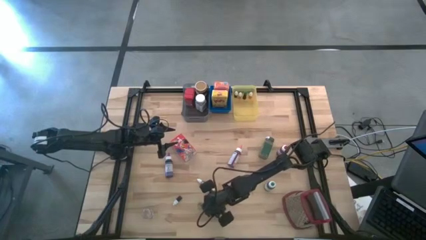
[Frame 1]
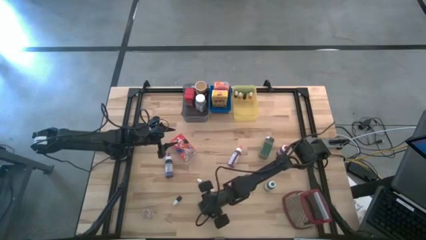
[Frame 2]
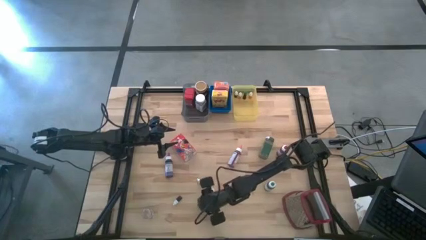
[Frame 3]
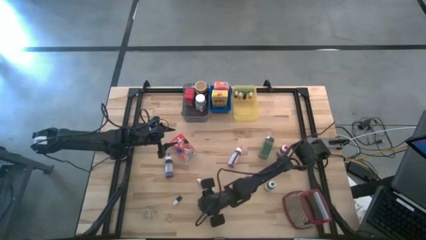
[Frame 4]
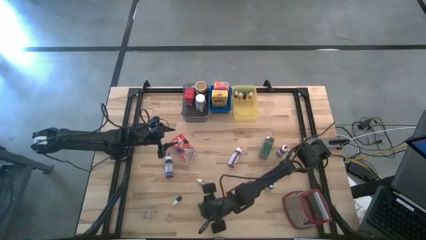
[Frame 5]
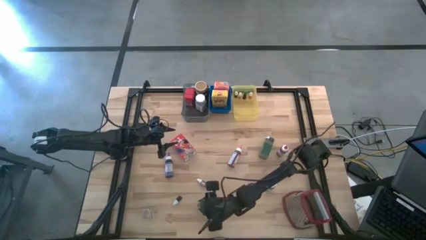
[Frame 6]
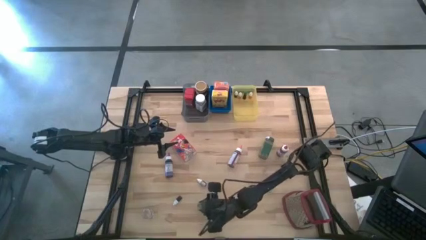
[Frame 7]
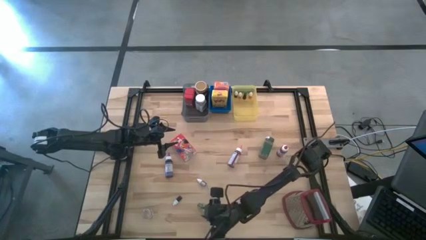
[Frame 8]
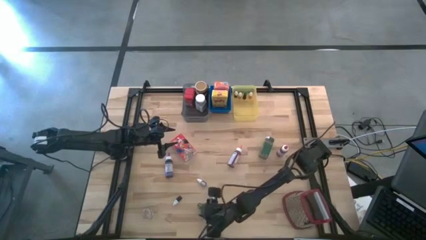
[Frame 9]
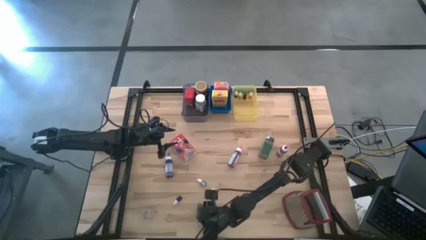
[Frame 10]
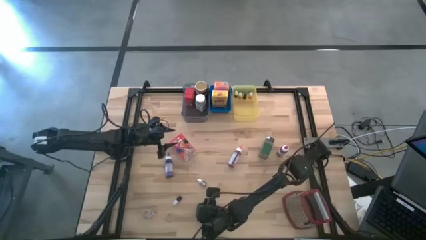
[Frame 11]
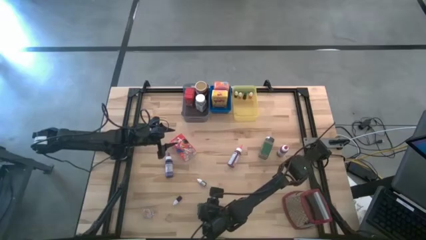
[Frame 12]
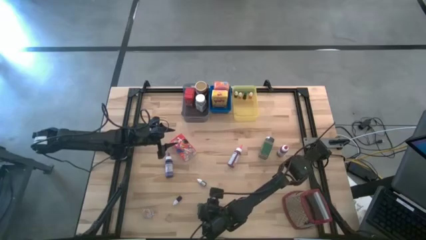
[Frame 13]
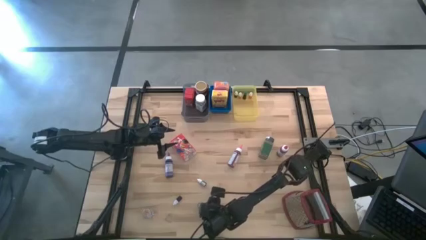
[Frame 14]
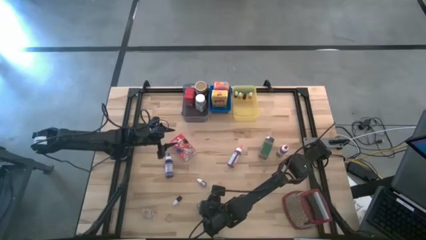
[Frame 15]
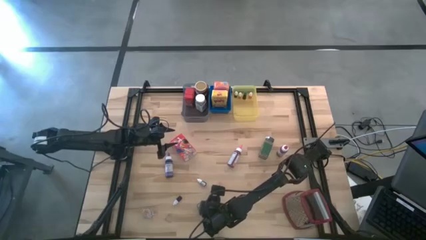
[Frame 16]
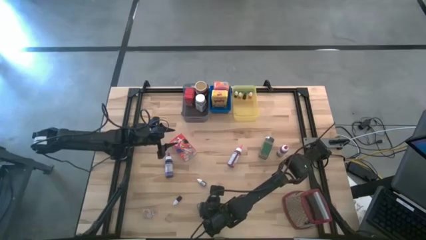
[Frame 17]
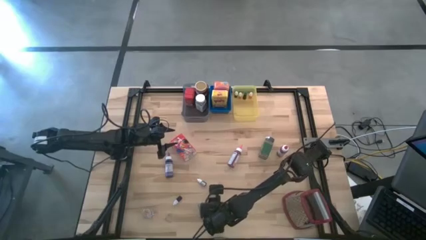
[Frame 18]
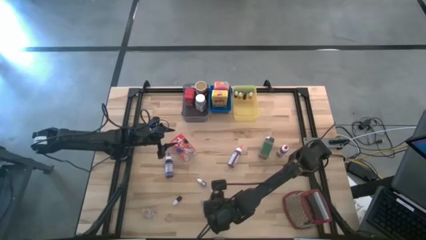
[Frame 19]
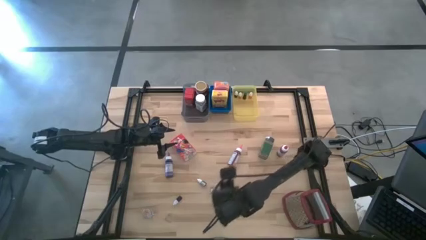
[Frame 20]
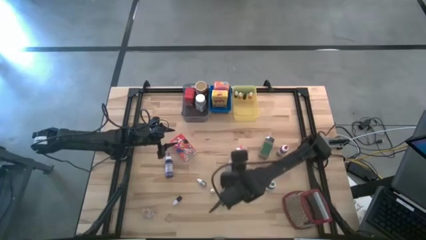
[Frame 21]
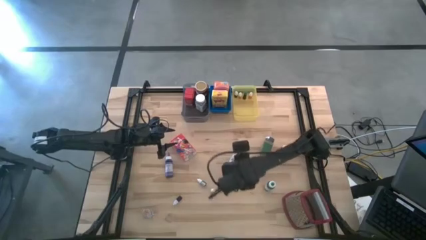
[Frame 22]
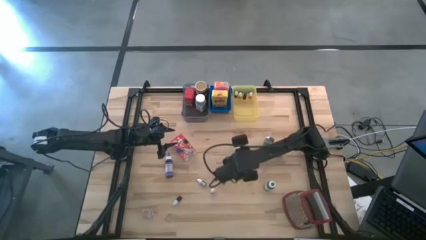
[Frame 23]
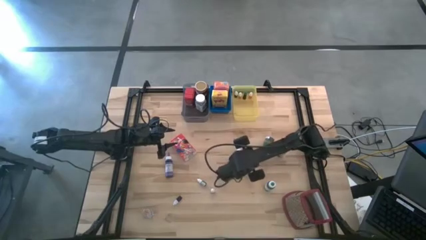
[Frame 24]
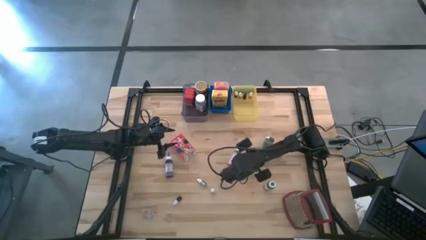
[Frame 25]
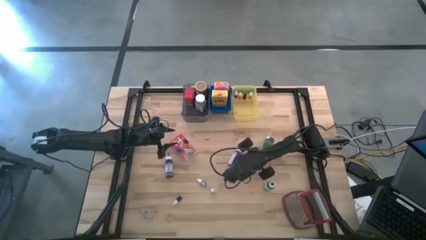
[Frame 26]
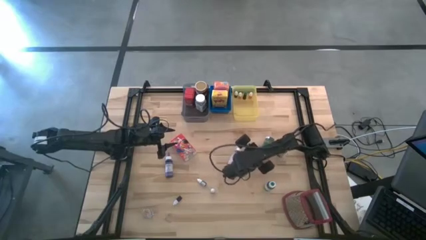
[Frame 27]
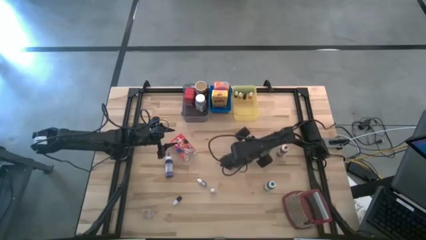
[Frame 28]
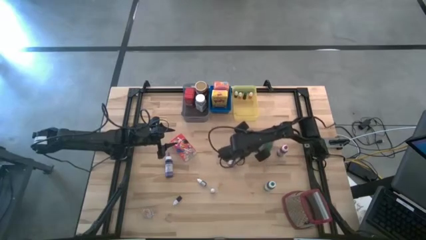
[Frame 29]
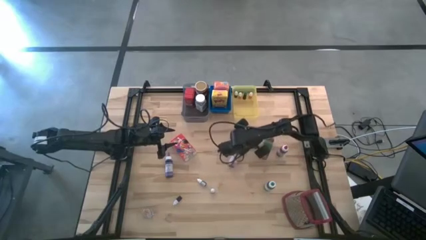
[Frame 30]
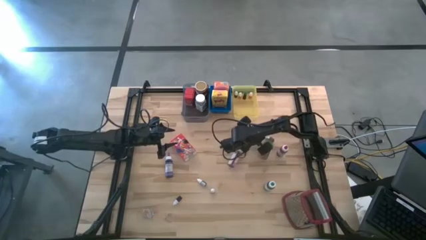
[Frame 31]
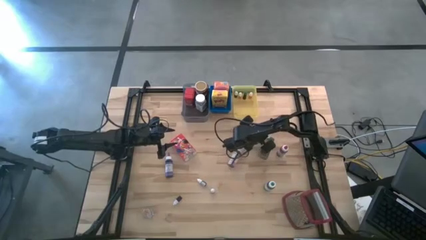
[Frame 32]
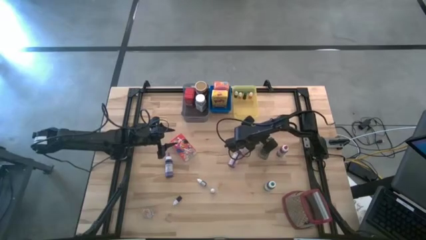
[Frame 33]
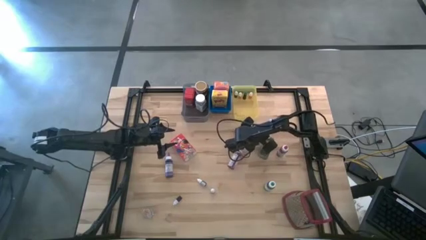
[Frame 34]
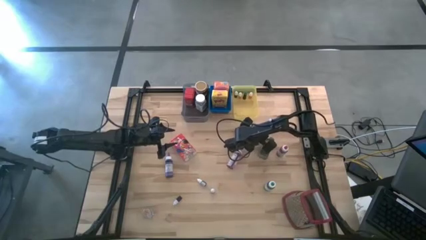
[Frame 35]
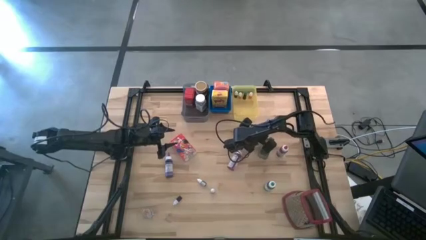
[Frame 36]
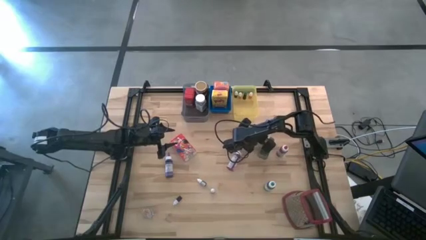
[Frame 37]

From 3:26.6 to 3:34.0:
Task: Pick & Place Kitchen Items
Move the small green food coloring bottle to the top right of the table

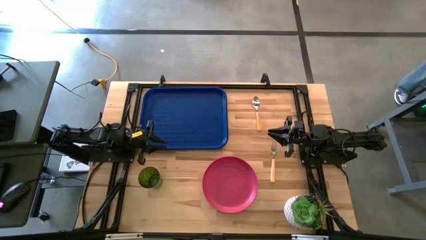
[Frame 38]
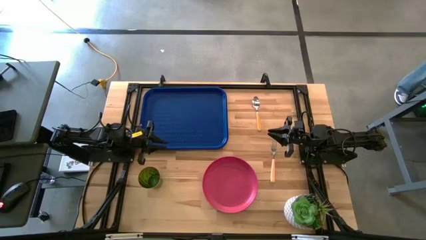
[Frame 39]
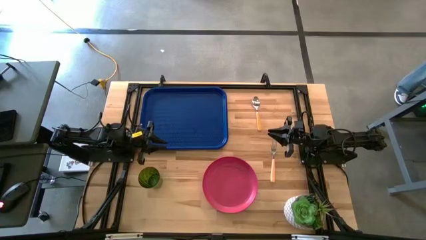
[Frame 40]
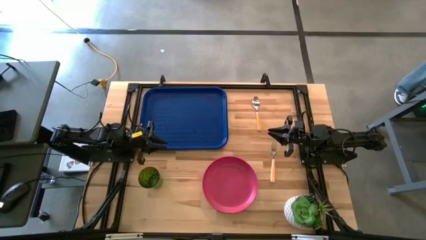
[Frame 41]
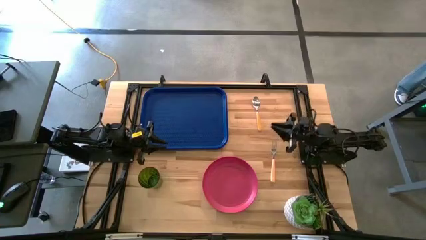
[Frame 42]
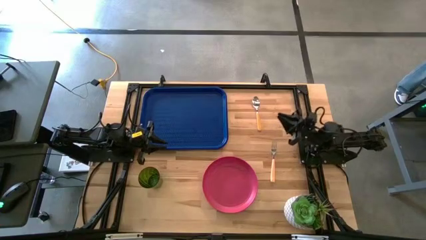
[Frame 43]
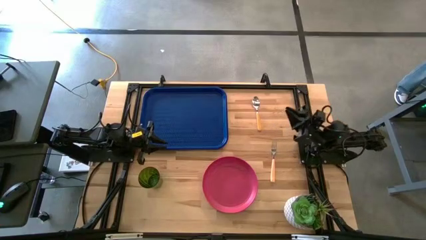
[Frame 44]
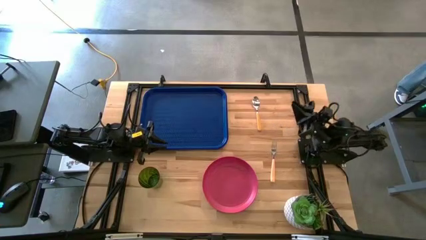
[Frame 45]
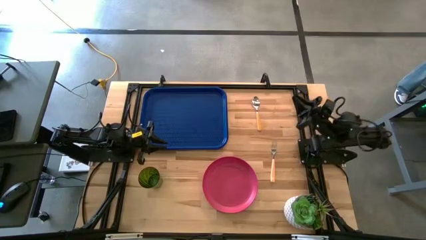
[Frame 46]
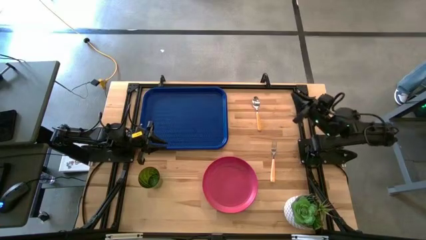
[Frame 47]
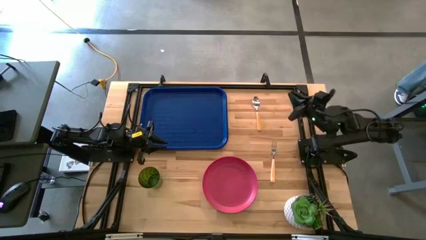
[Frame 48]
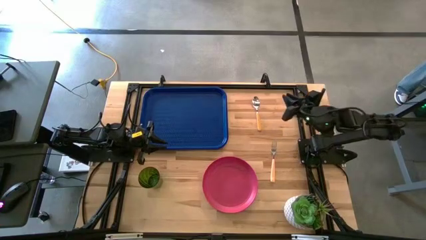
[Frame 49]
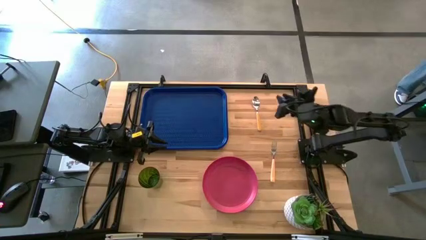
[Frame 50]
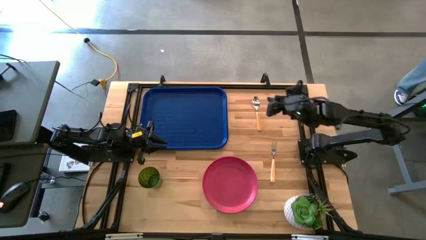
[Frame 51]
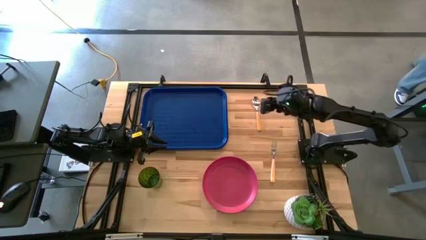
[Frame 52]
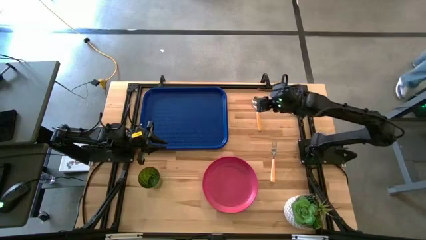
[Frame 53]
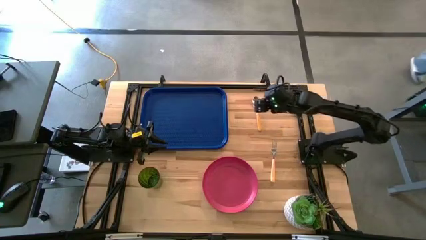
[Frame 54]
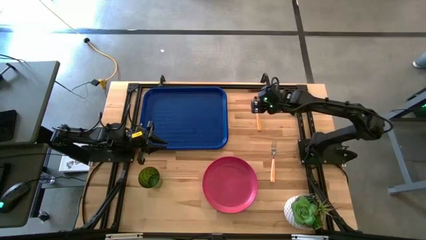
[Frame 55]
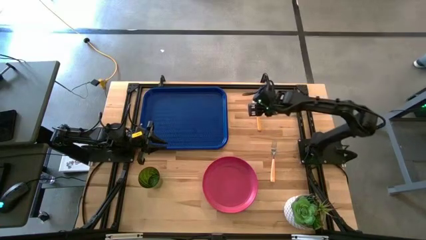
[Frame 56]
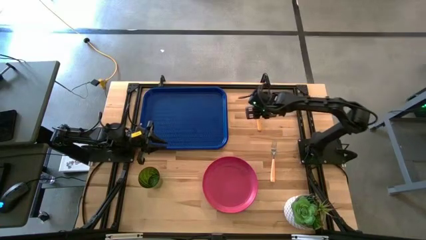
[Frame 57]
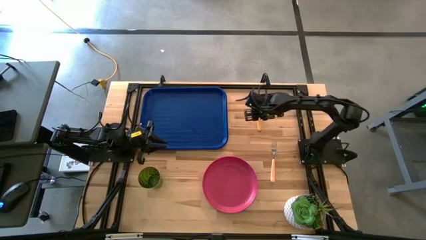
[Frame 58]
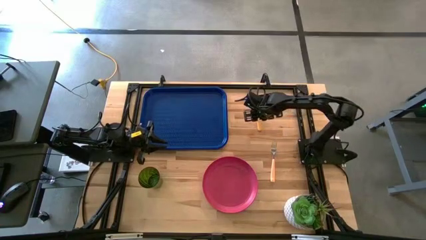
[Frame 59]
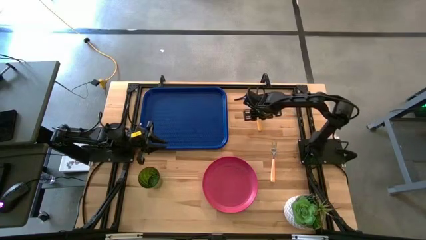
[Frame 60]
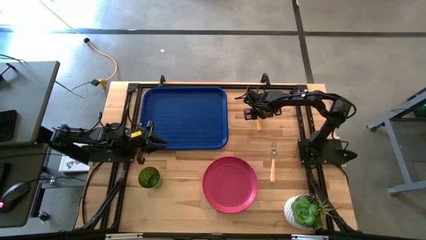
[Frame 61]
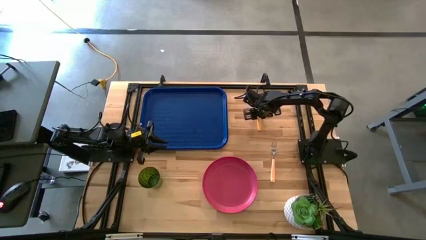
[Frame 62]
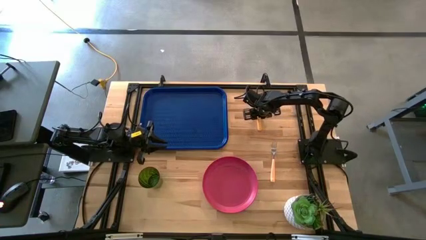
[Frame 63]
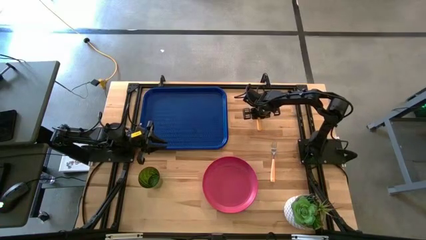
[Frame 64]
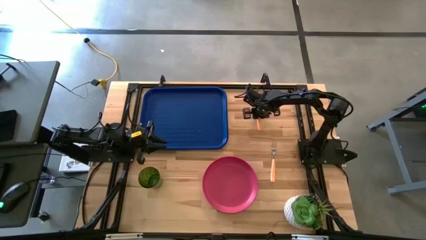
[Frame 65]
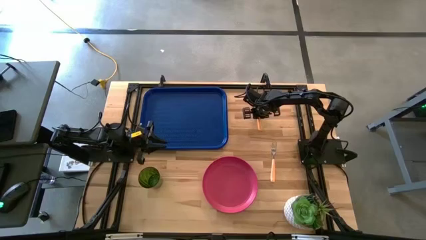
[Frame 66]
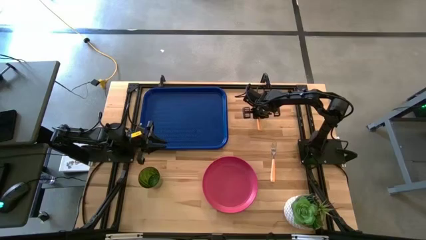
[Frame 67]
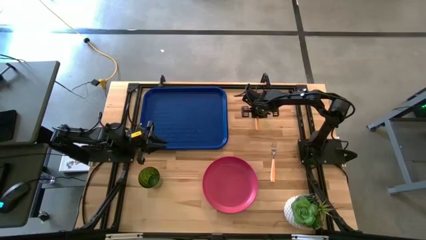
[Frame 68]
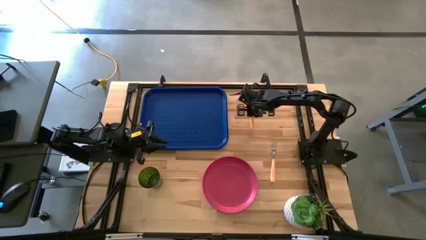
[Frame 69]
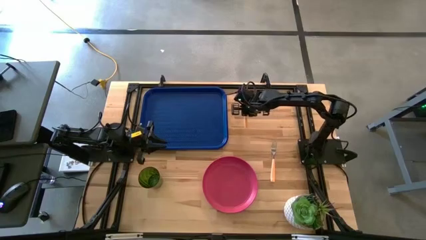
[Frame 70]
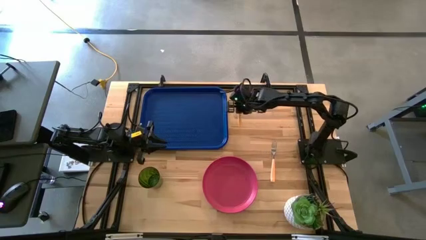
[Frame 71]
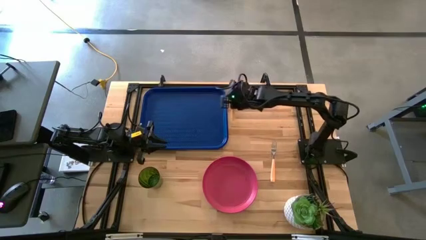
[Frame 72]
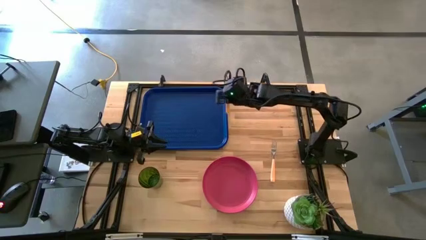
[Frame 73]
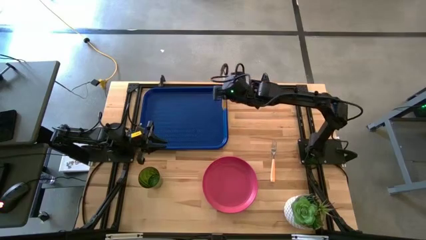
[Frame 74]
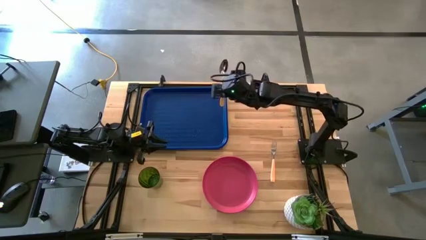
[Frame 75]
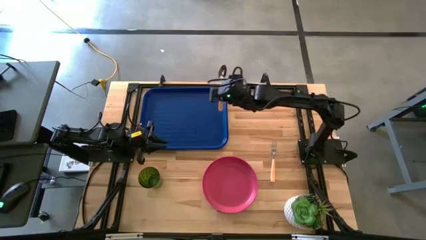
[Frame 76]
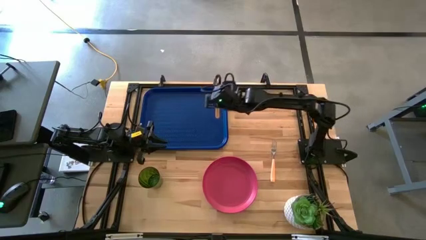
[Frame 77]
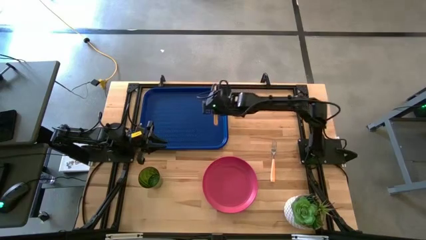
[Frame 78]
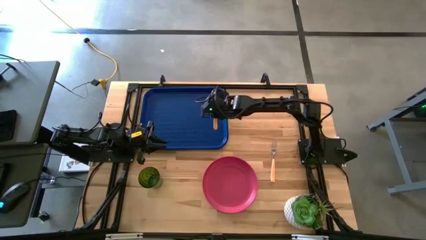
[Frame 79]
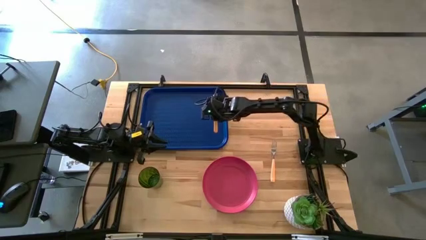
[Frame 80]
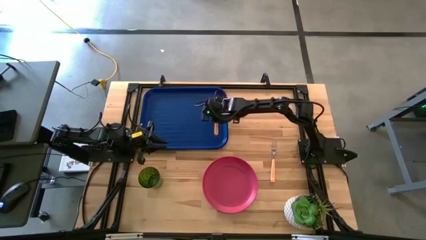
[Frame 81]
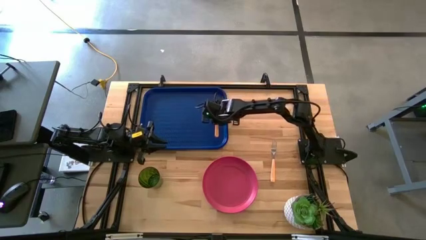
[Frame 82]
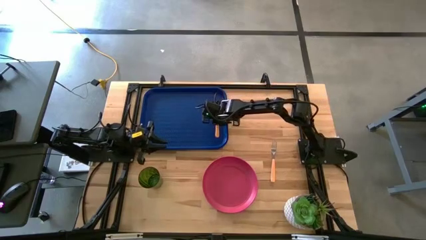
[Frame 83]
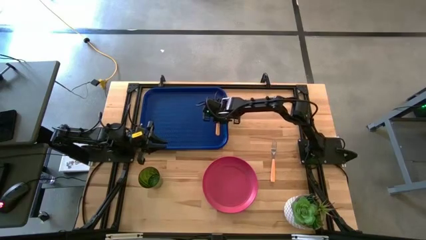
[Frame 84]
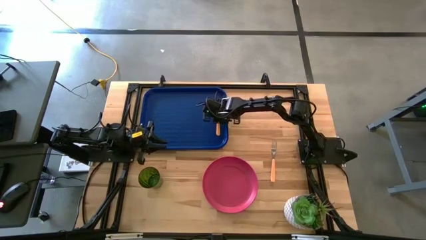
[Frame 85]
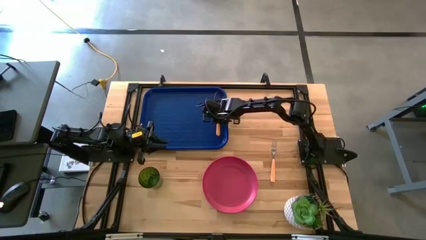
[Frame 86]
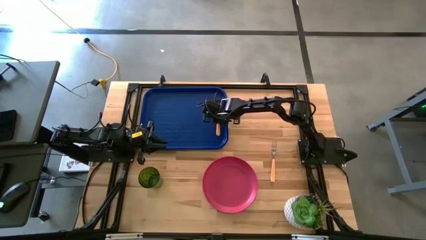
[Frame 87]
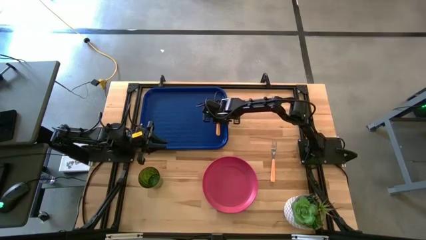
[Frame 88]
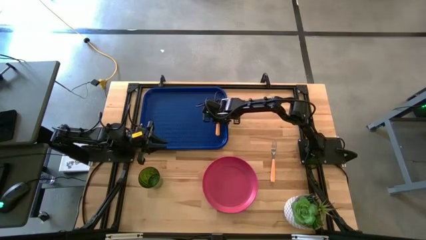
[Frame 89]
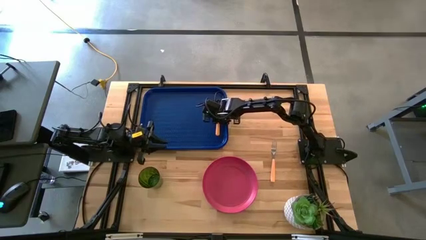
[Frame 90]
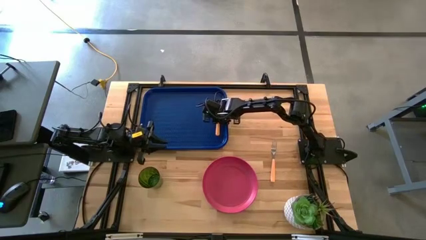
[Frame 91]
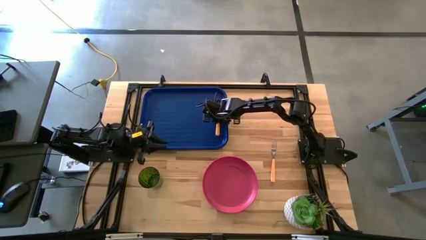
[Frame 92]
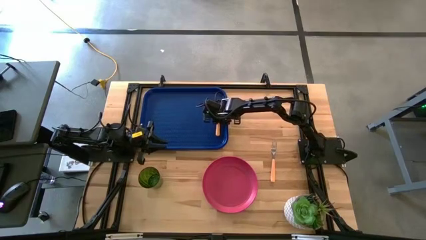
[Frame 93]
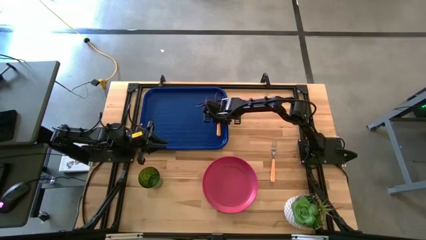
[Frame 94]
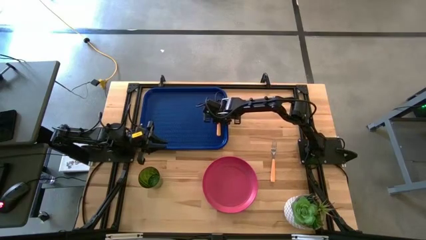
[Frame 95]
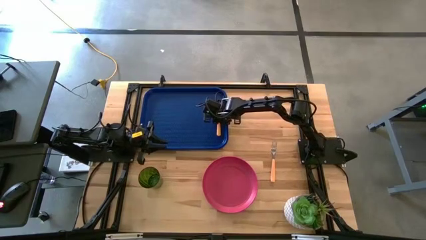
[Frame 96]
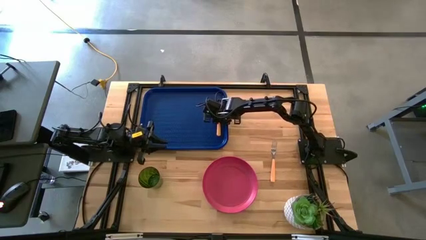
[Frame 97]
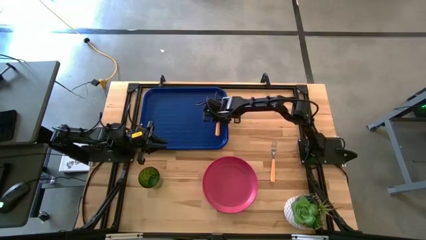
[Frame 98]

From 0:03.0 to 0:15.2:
Task: Pick and place plate/cup/fork/spoon on tray
Put the brown spoon on the blue serving tray
